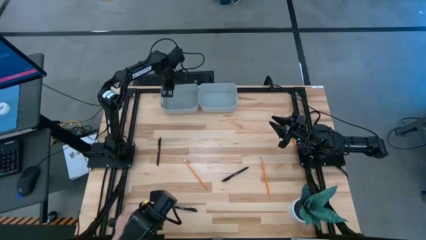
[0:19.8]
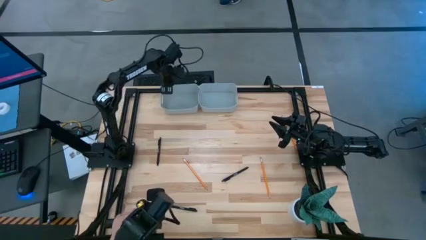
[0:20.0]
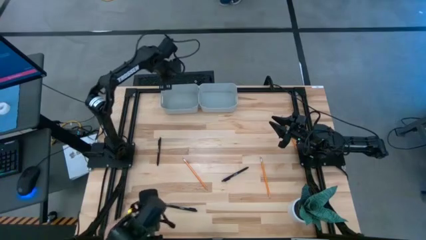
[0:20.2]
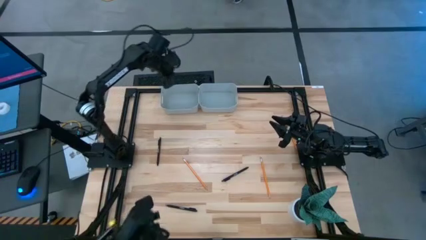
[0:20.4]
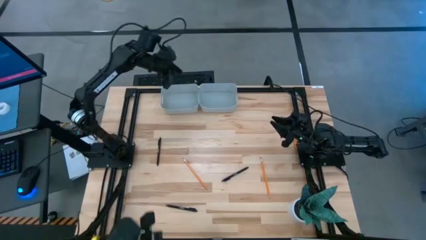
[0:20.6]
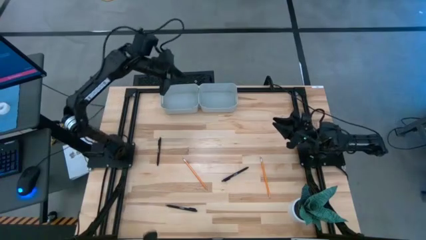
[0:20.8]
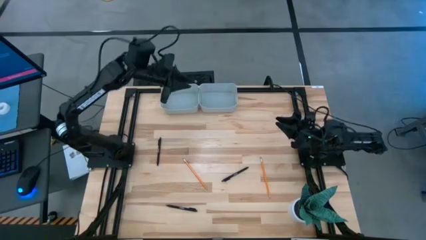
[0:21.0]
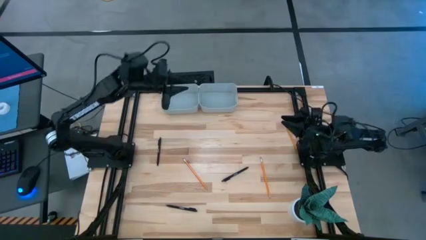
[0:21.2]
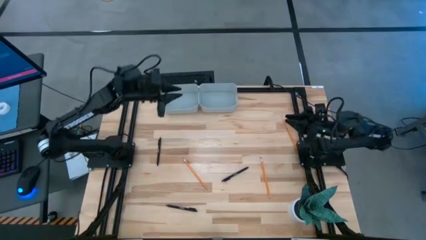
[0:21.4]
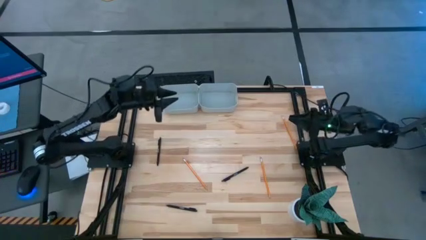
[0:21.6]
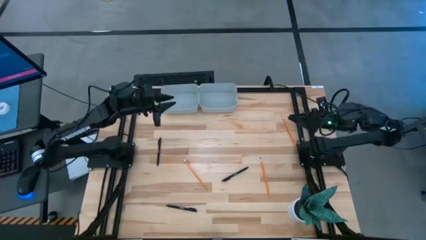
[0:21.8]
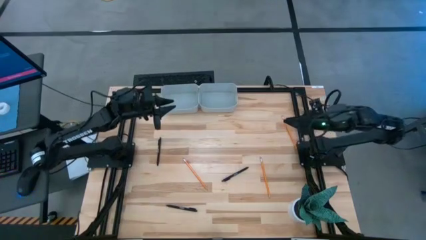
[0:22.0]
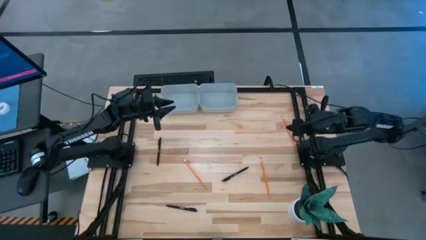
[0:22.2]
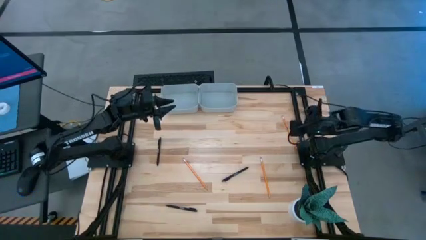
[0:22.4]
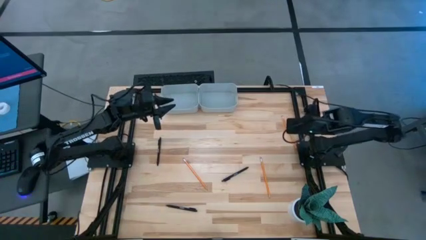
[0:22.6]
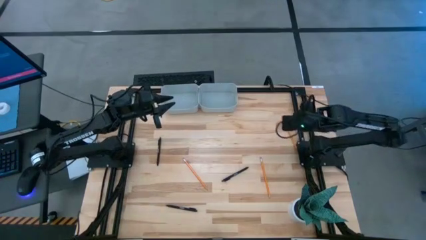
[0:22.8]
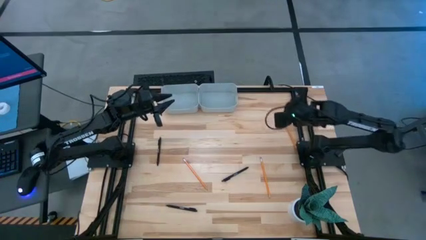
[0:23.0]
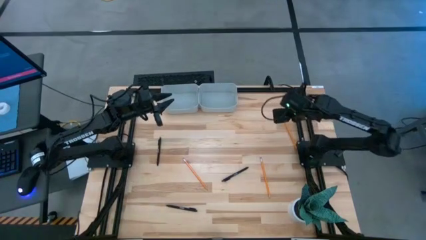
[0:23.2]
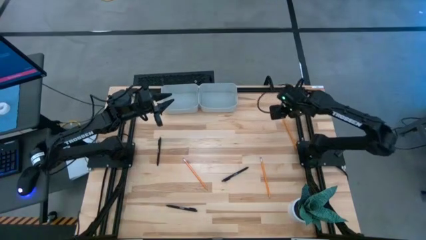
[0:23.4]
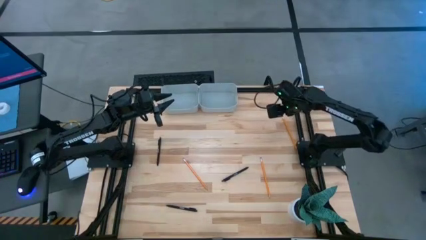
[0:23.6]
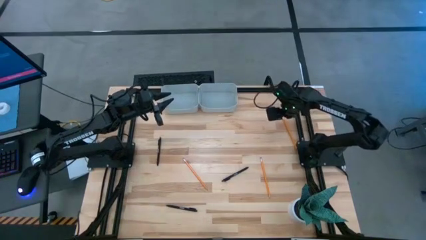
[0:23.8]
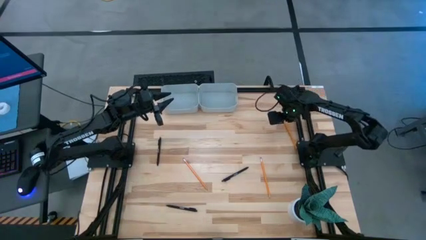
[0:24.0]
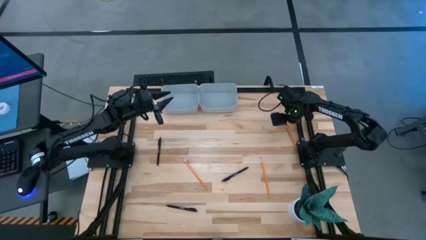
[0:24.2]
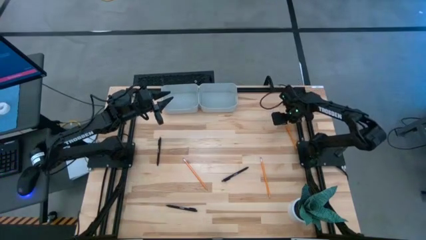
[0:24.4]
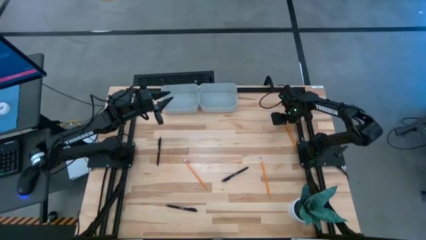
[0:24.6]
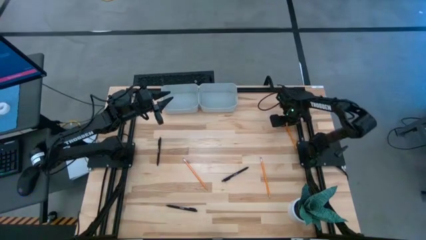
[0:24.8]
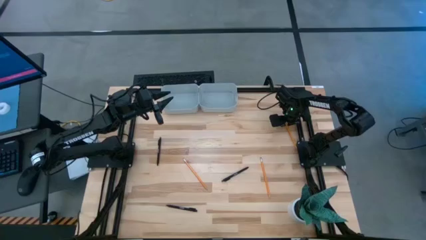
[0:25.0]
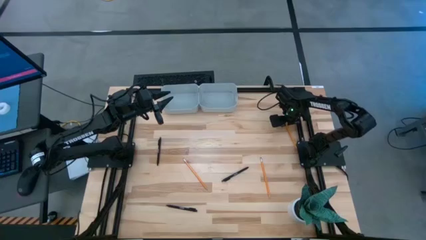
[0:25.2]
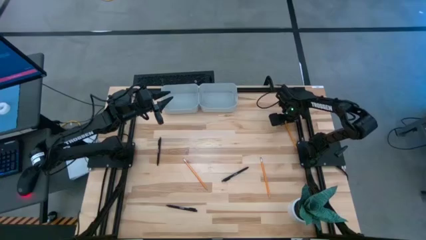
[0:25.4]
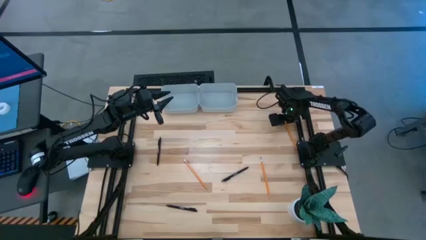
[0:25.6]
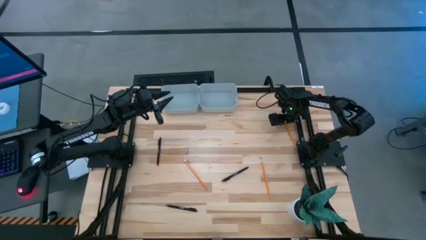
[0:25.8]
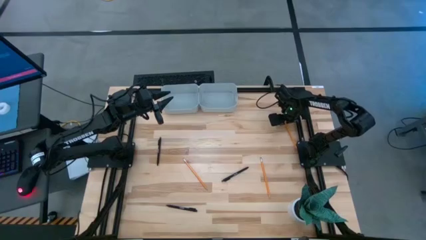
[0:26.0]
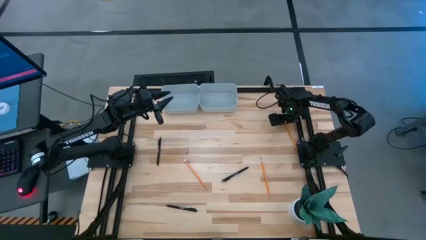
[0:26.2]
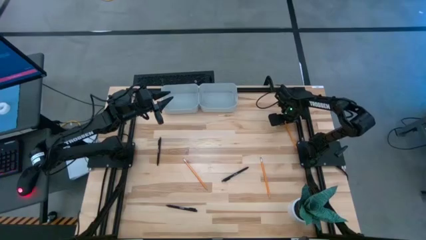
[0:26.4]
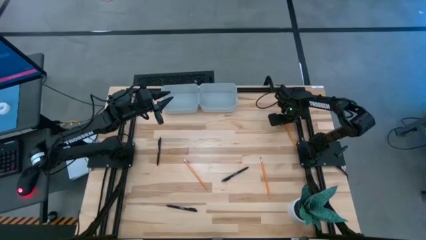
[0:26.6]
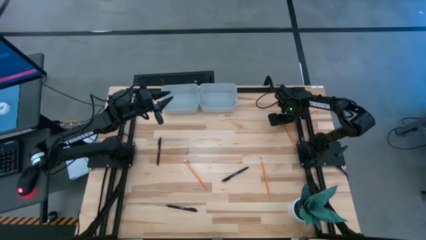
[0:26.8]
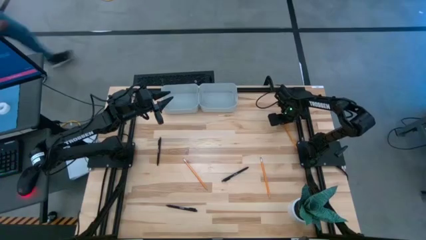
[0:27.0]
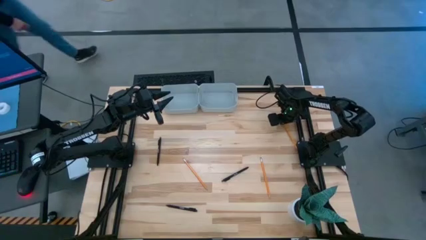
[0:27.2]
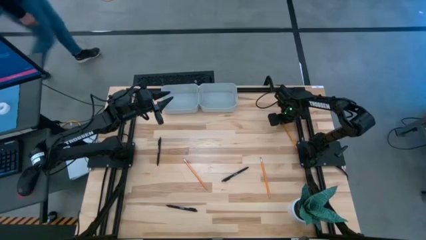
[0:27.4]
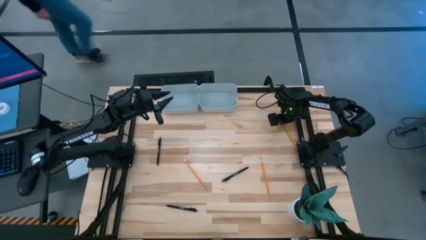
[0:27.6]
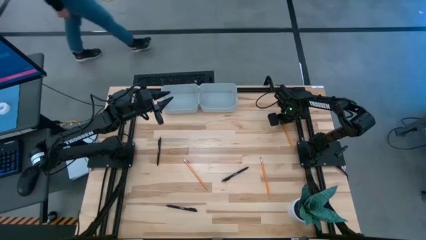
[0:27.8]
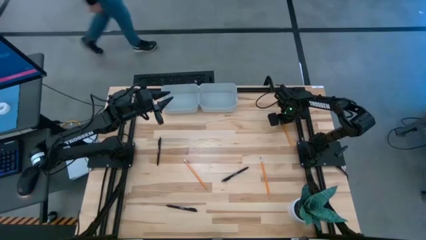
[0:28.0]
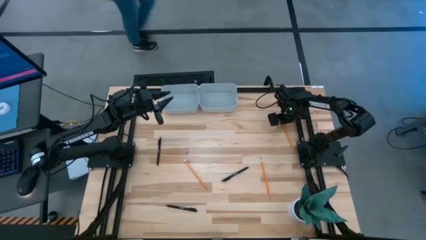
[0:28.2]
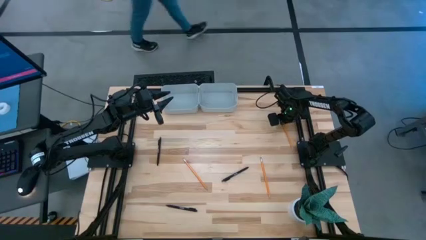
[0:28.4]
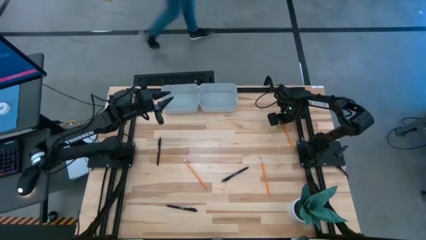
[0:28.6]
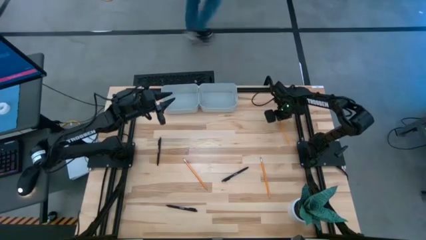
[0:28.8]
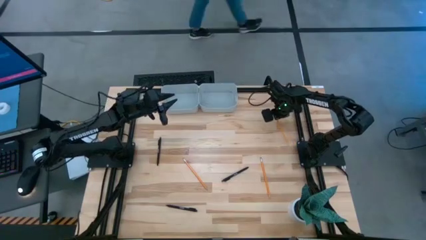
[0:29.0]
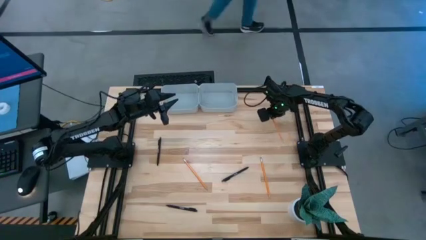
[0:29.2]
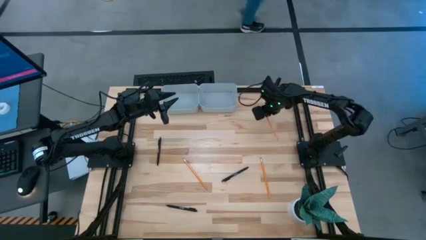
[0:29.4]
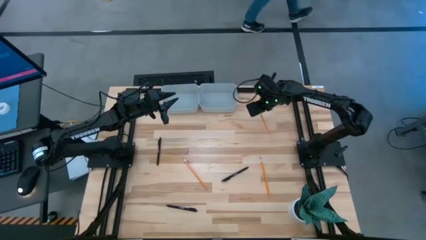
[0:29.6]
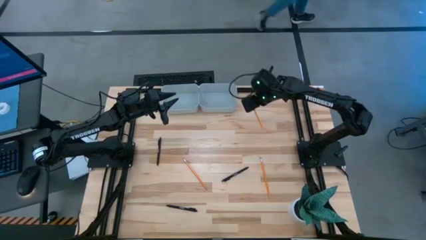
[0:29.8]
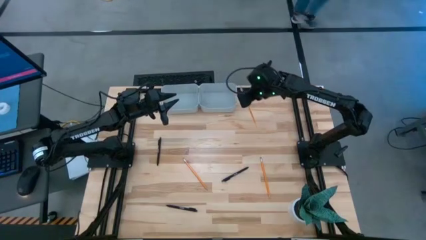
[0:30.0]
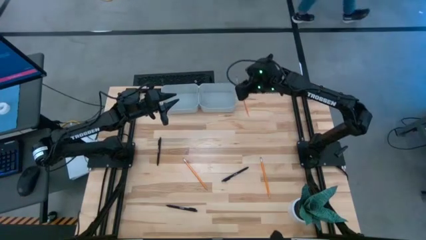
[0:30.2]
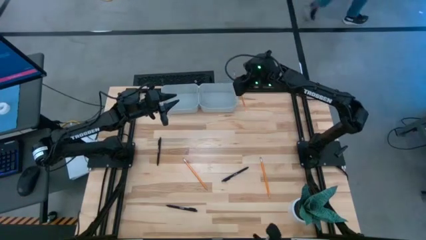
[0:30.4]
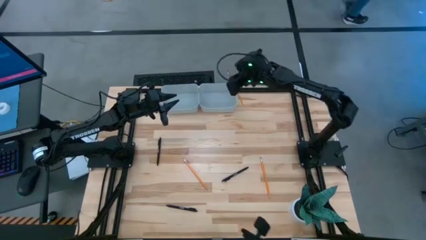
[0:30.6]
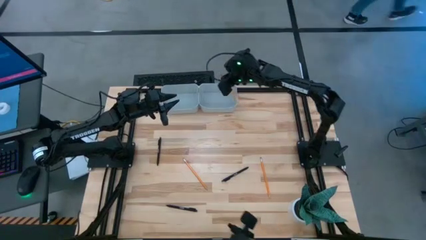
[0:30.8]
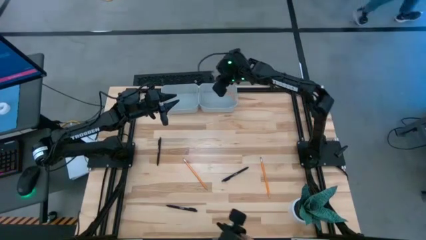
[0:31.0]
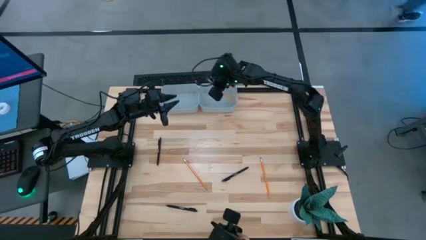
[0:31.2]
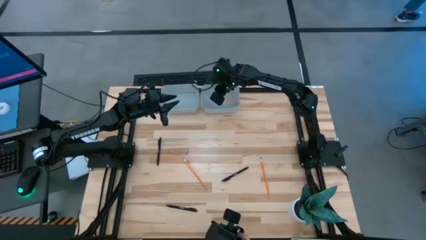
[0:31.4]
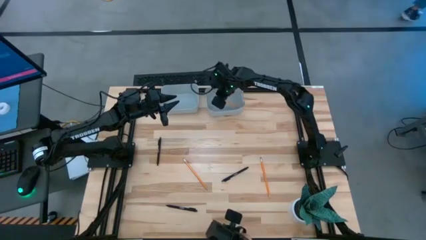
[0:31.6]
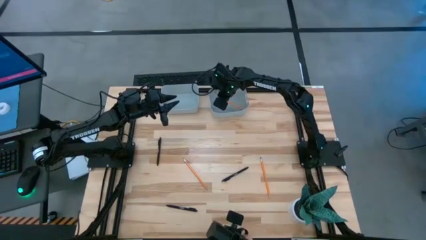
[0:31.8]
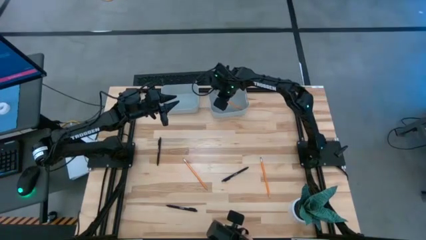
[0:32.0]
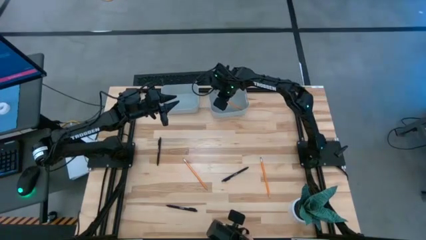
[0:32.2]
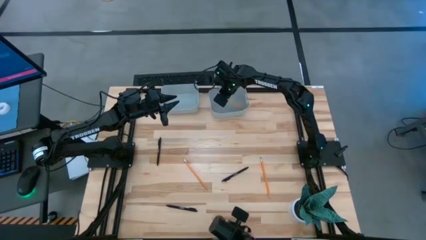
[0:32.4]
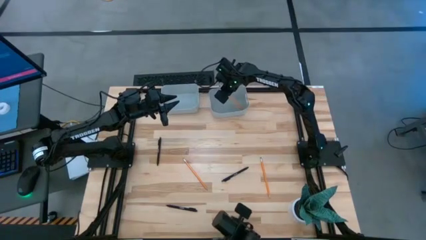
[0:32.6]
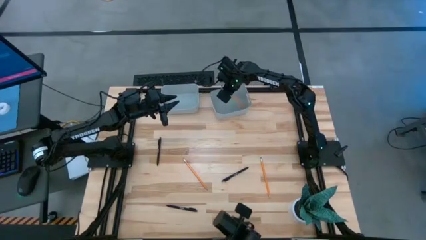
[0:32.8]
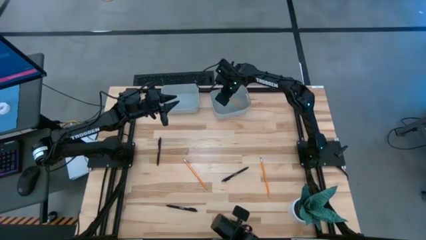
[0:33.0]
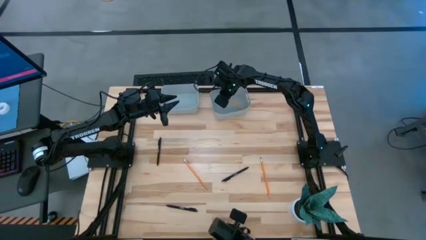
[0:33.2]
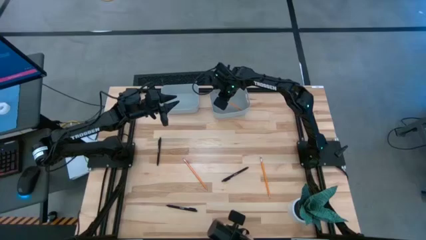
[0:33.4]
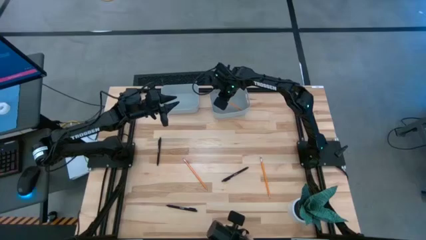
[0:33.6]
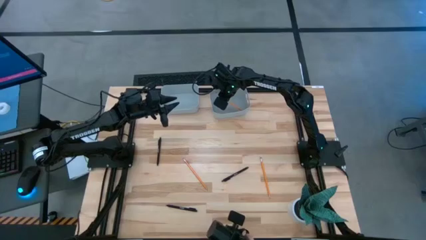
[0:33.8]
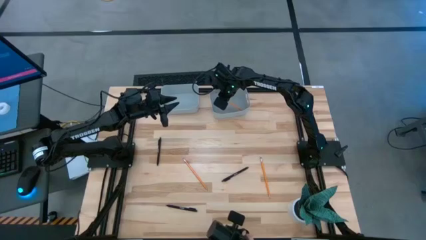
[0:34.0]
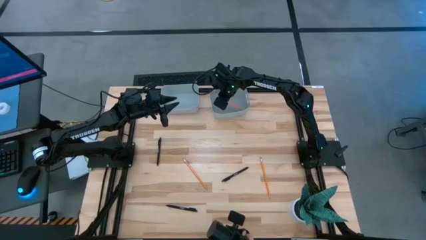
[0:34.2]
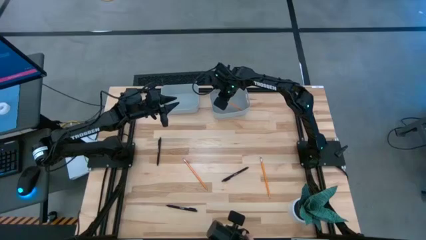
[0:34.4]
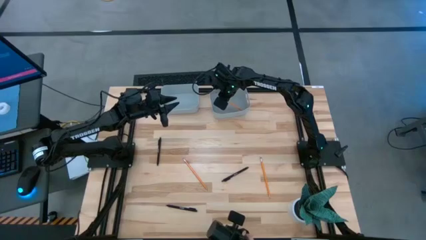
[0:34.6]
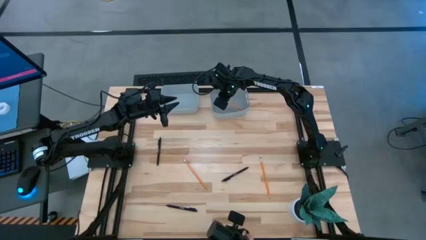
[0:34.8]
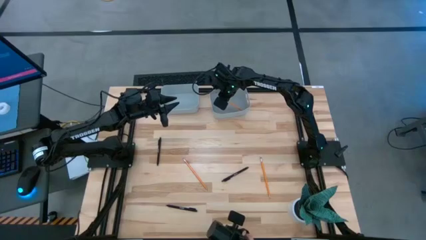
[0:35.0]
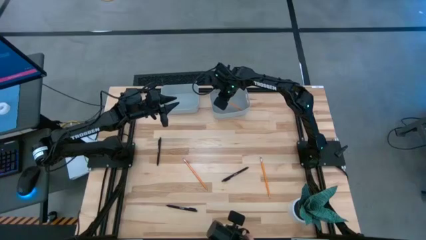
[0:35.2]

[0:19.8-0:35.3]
Task: Sort pens & pencils
Put the top yellow pencil into the right gray bin
